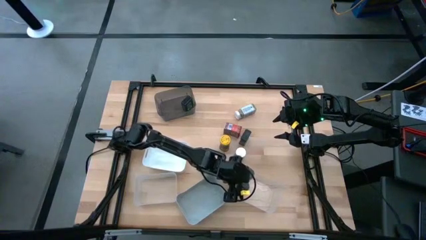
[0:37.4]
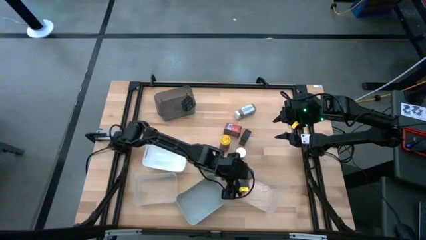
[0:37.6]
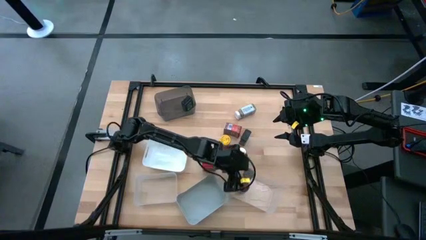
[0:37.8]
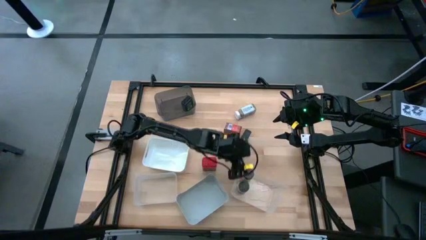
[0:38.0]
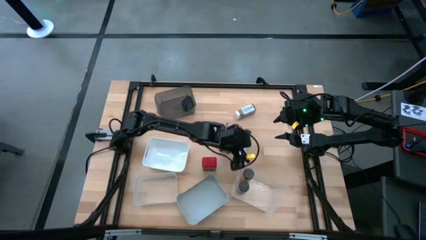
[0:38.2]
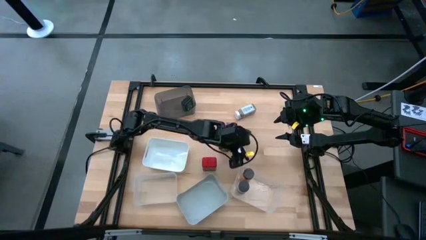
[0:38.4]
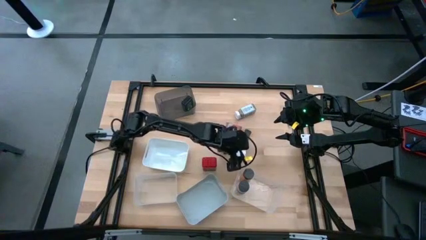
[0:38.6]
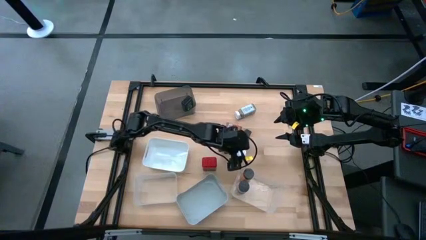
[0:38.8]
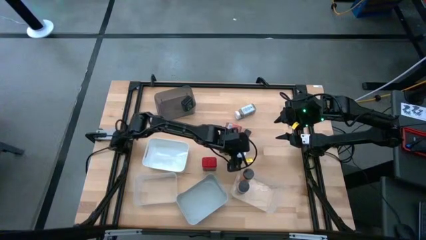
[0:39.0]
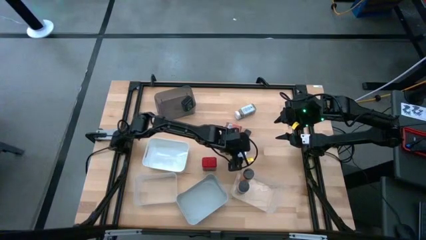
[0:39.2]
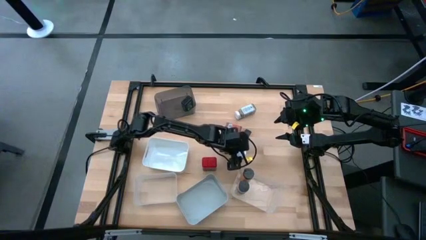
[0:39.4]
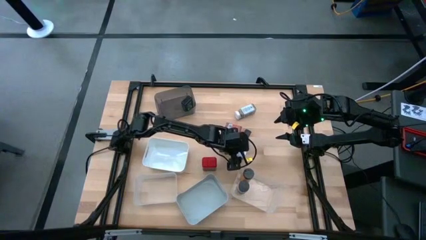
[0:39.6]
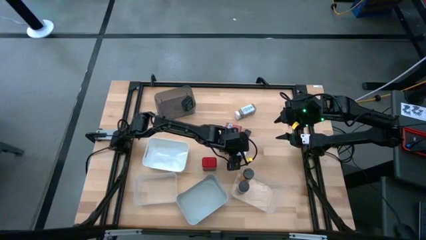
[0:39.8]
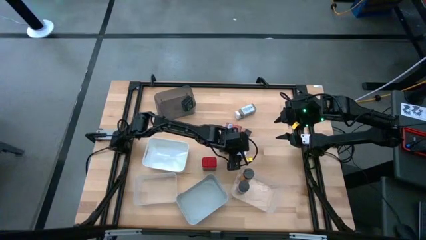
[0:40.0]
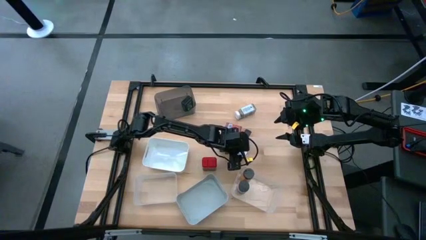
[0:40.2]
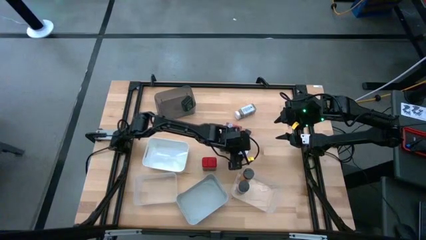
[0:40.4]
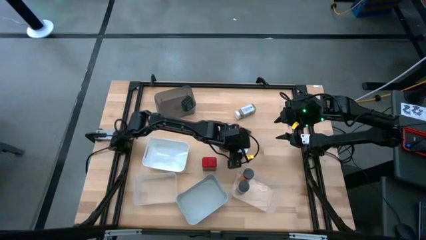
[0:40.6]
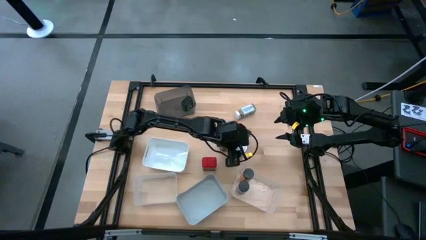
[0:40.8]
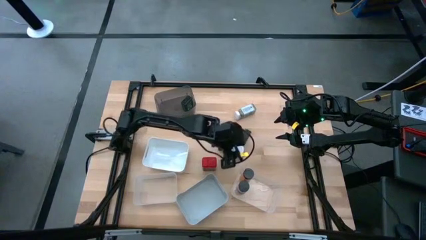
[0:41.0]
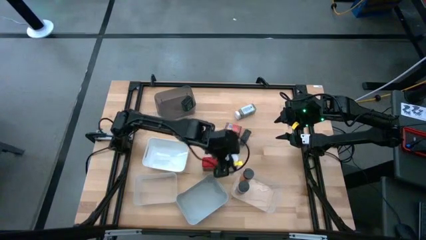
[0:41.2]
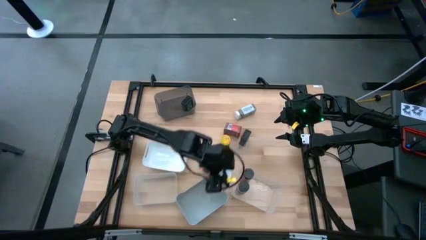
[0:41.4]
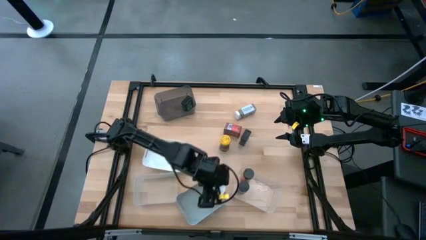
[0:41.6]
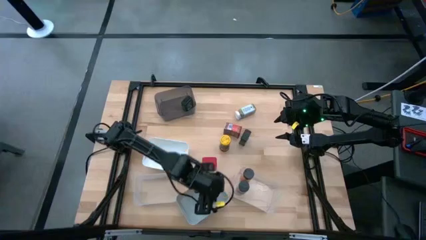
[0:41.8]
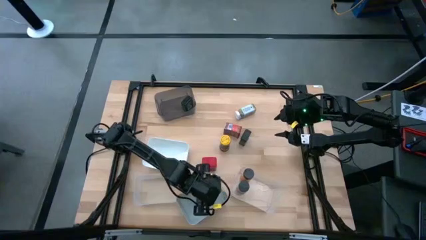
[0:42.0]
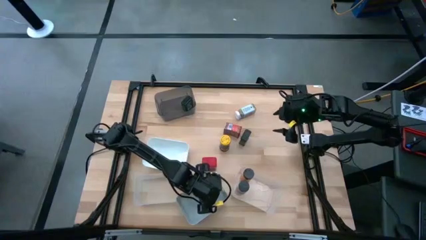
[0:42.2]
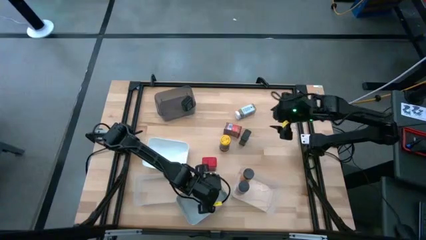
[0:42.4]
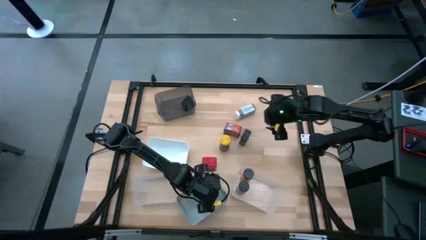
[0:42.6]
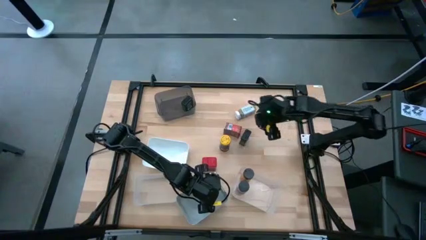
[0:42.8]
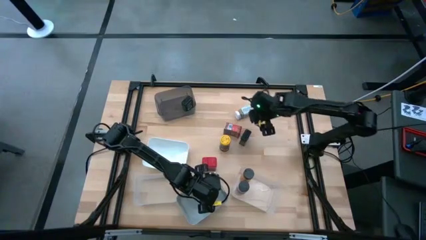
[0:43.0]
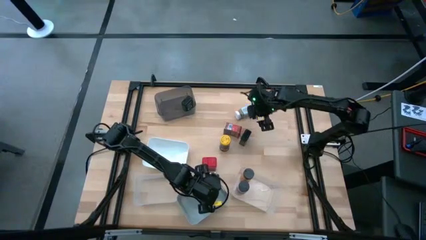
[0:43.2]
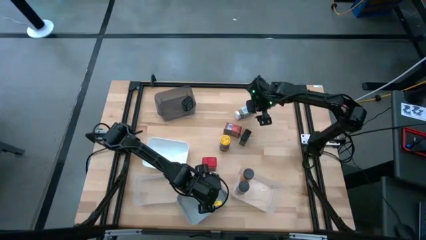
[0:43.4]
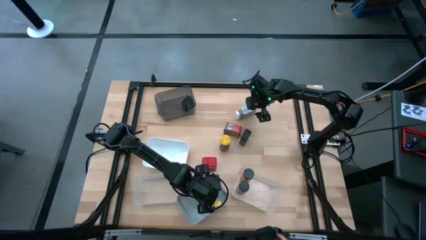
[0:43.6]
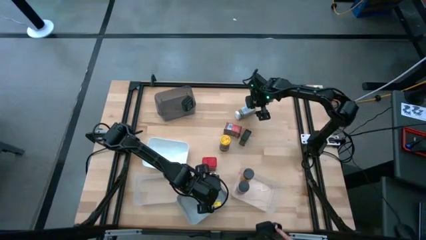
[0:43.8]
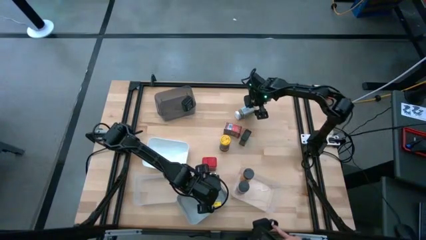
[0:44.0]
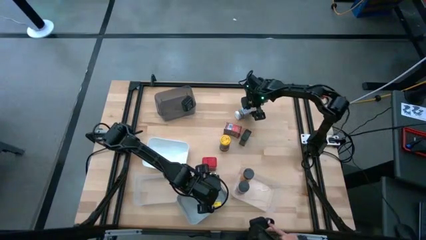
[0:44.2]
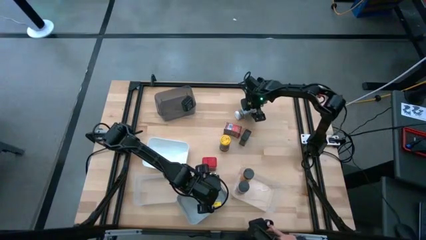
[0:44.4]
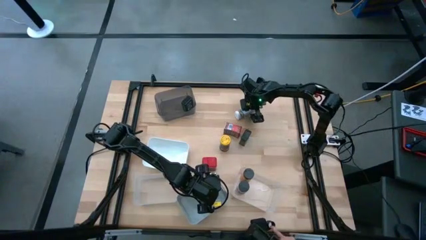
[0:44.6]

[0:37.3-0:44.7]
Task: Sort spices by type
Put the bottom white seasoning bottle into the gray bin

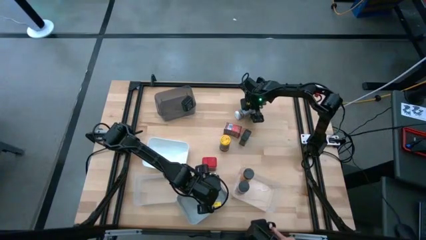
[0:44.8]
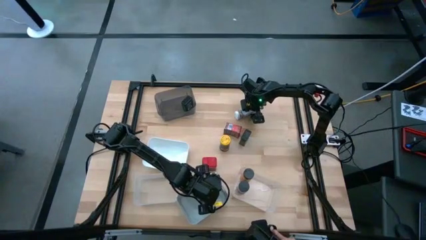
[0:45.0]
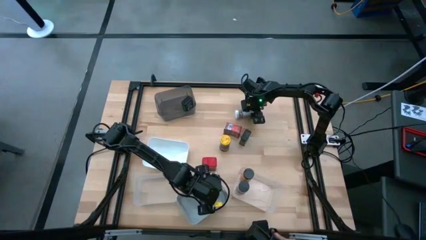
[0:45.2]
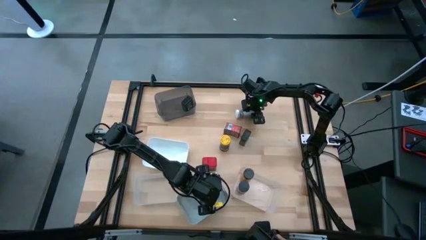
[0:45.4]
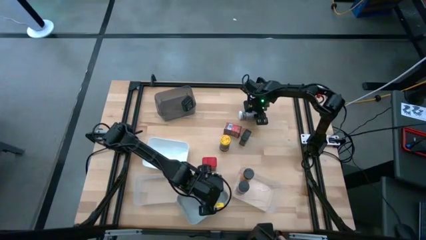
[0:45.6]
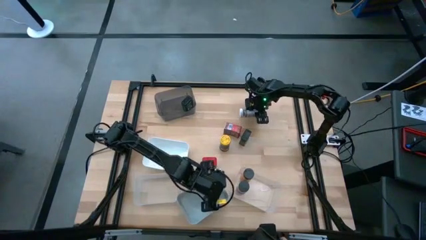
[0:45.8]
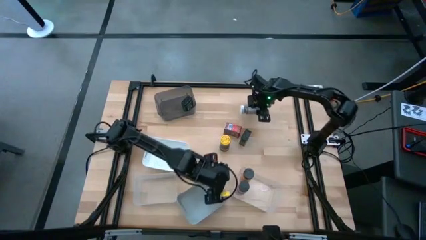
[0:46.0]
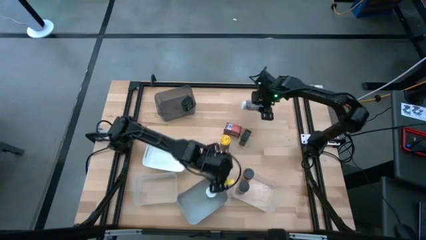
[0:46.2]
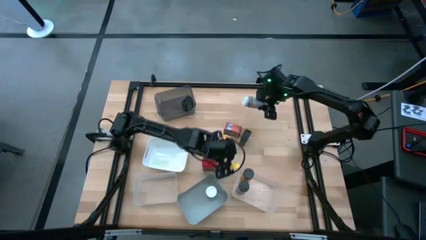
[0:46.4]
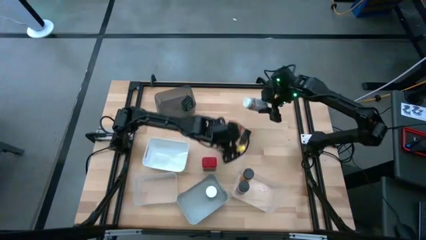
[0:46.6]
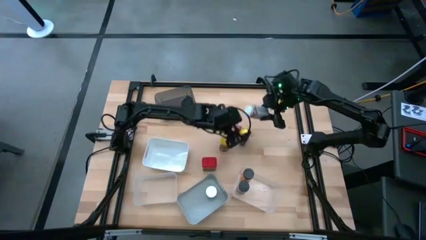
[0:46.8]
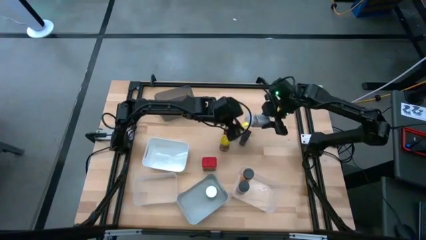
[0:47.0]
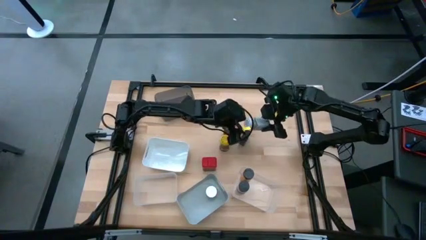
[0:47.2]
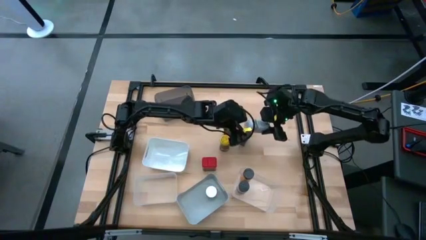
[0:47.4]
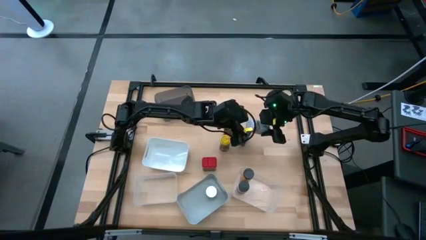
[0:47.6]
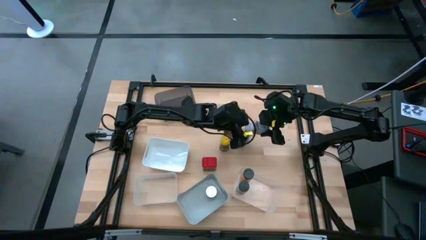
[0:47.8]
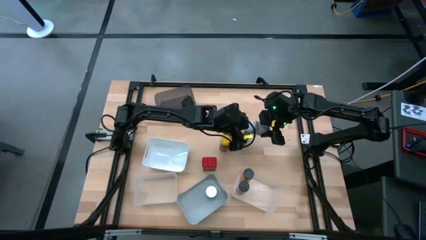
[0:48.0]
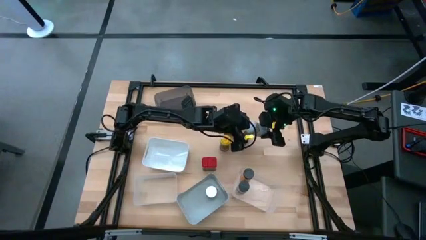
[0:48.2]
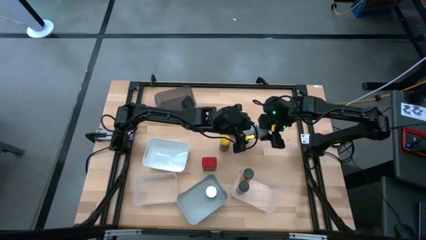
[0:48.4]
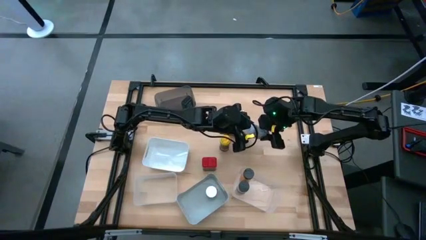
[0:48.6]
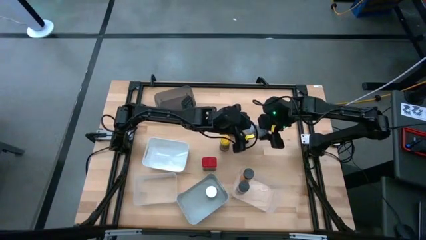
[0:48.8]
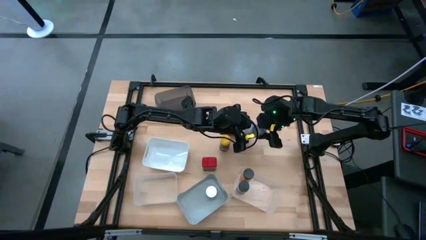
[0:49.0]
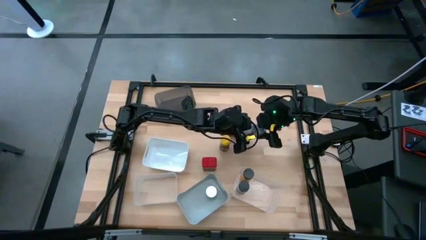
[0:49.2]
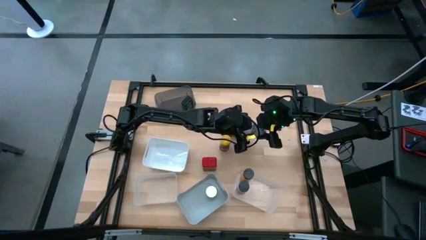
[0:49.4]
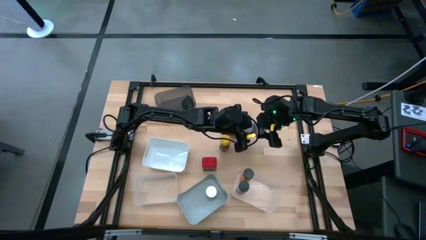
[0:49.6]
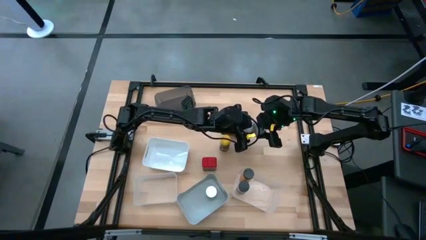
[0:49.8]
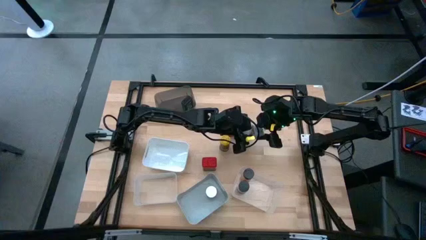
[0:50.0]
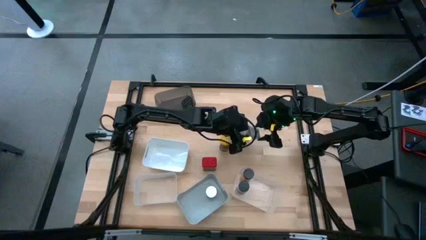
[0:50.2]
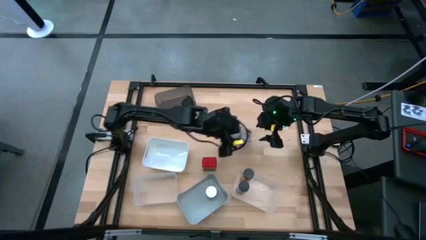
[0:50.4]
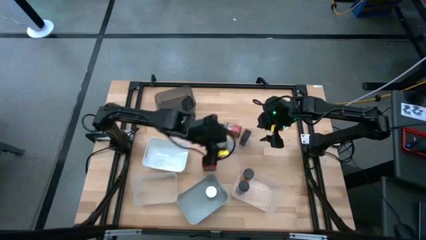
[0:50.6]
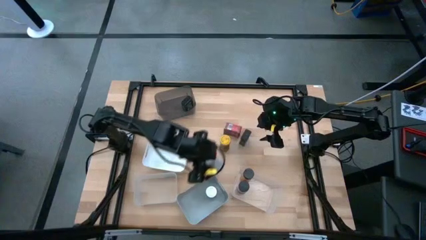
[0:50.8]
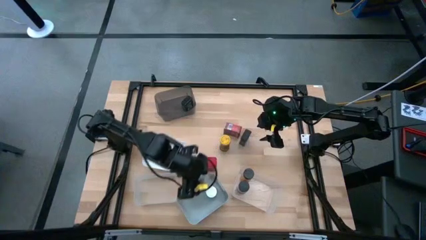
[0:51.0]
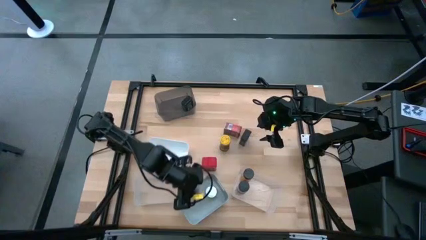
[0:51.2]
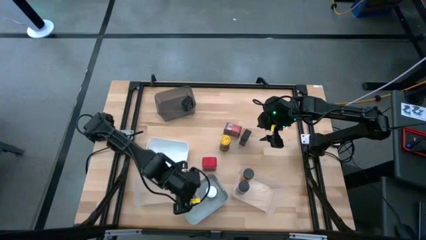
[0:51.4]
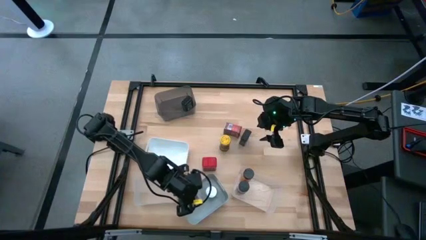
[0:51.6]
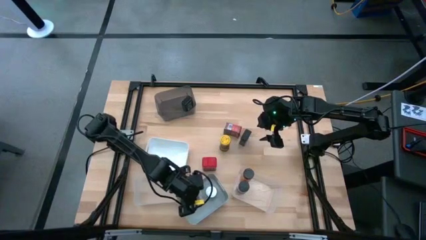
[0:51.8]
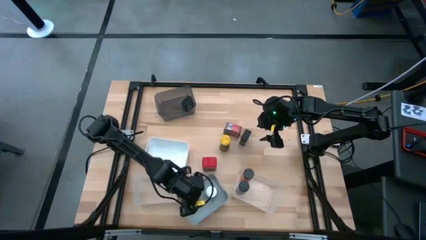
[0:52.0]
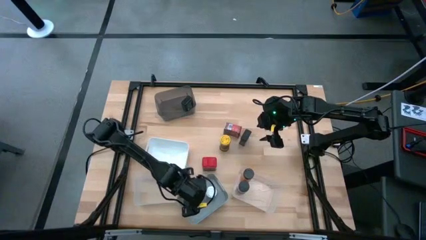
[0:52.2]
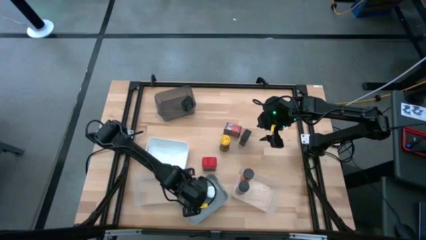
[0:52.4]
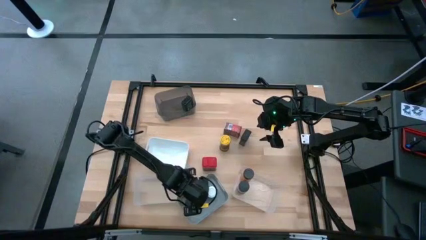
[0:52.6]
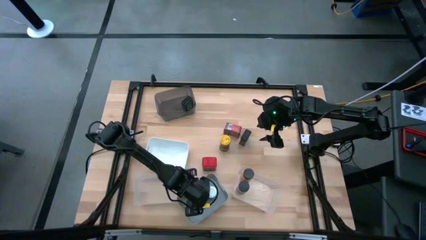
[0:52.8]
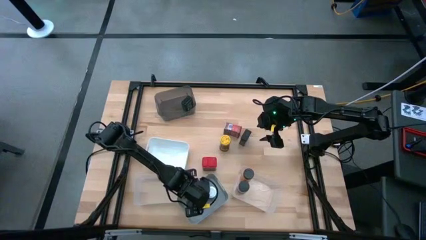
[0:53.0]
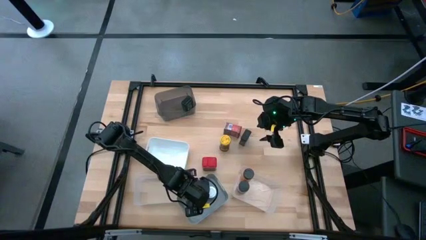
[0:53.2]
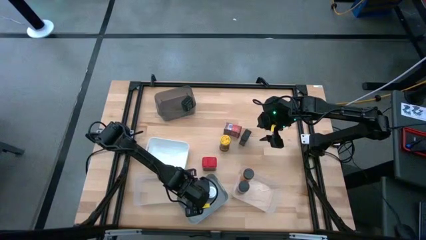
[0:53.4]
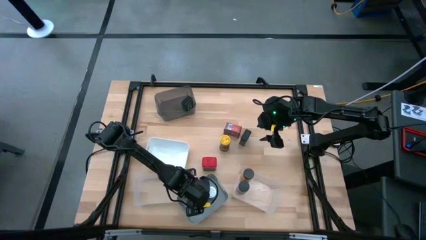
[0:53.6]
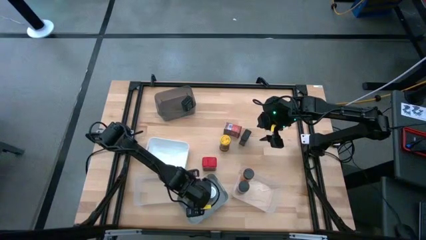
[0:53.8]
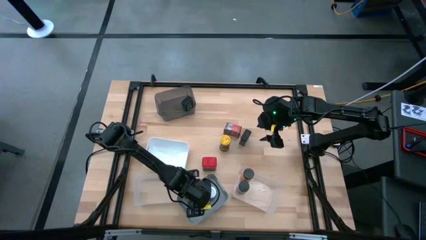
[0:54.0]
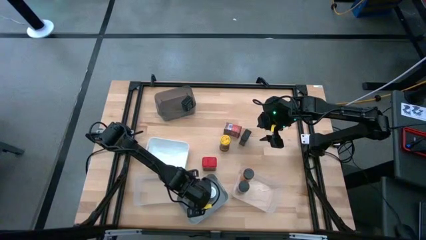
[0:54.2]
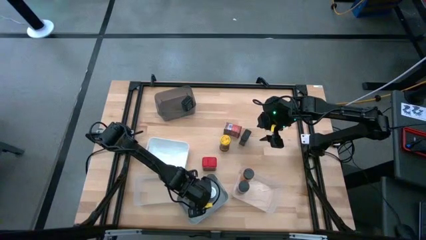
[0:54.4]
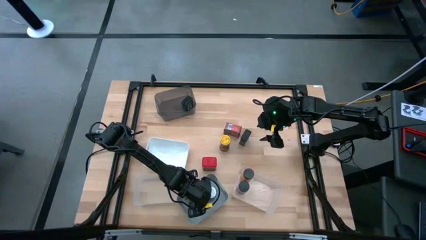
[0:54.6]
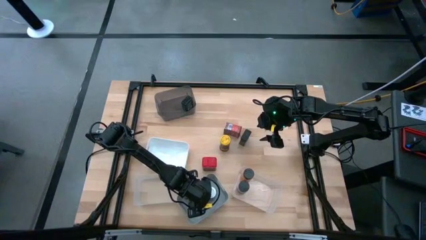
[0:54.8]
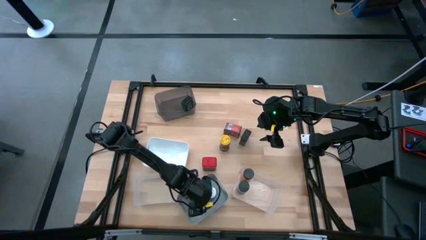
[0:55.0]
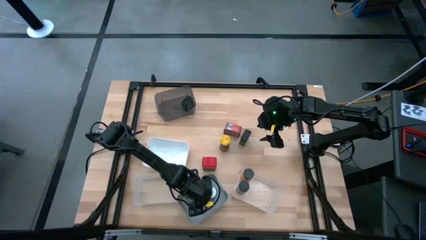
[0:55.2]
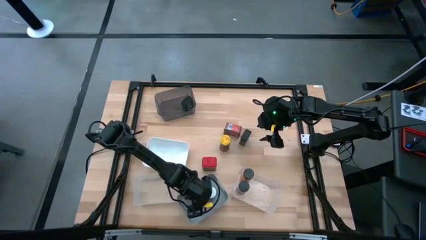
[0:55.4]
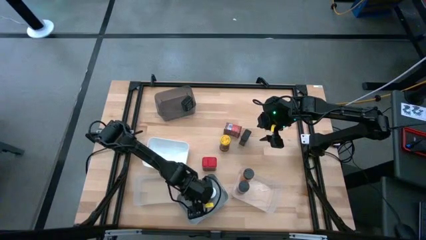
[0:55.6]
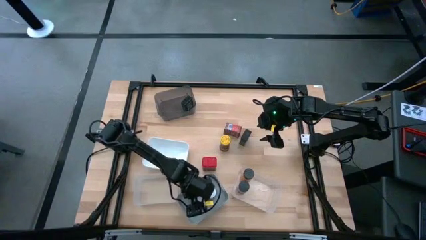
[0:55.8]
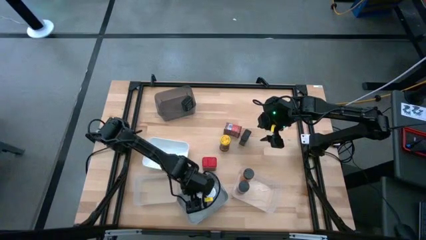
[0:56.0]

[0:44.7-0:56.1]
Put the white seasoning bottle into the gray bin
